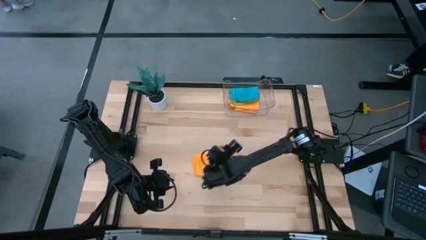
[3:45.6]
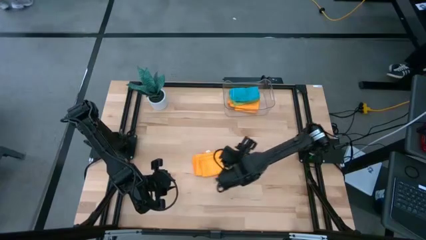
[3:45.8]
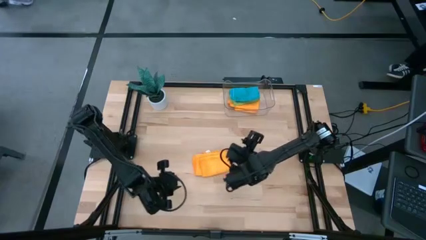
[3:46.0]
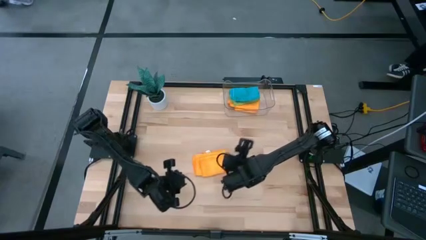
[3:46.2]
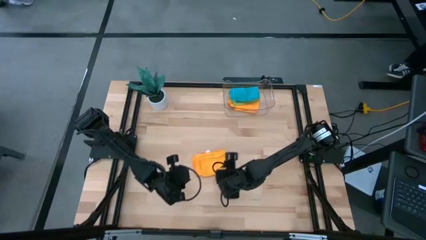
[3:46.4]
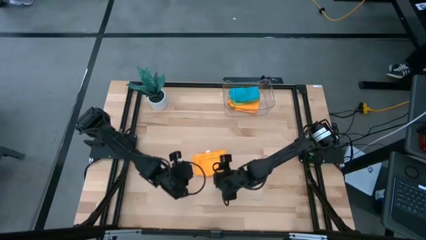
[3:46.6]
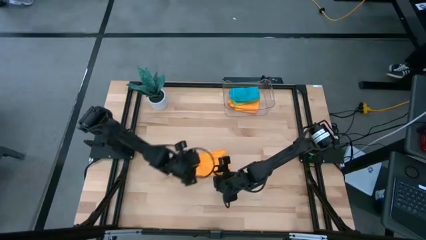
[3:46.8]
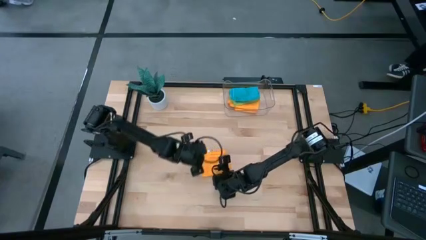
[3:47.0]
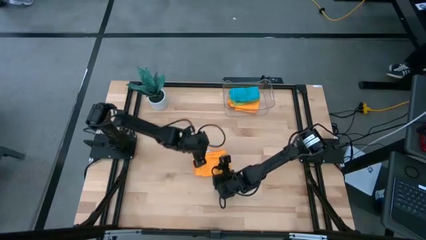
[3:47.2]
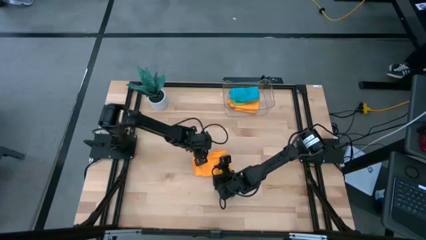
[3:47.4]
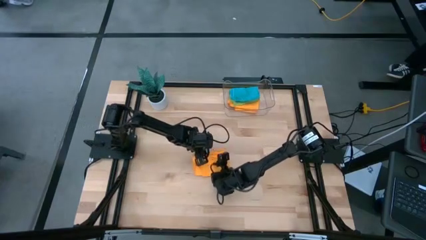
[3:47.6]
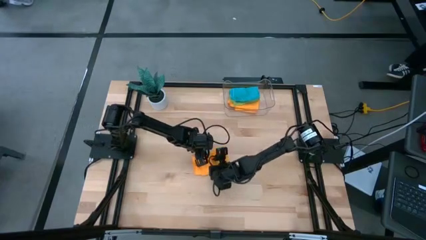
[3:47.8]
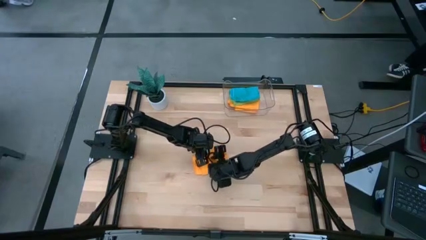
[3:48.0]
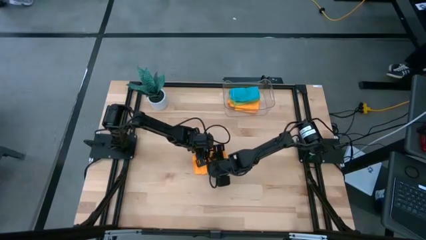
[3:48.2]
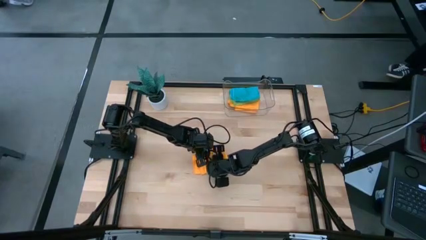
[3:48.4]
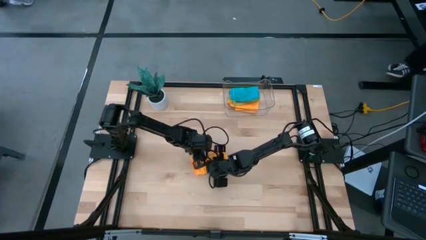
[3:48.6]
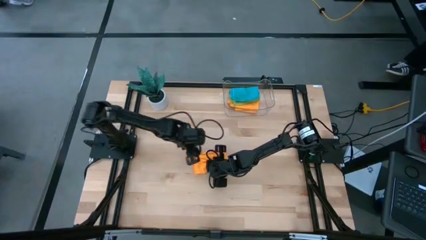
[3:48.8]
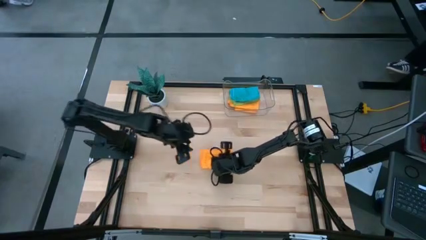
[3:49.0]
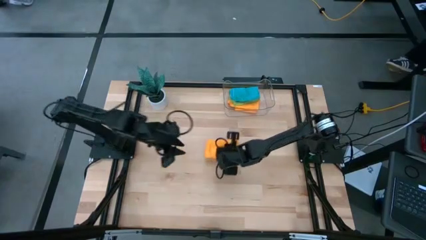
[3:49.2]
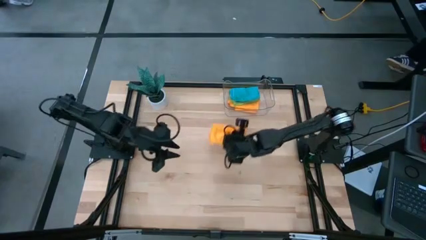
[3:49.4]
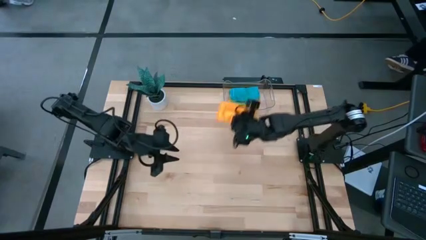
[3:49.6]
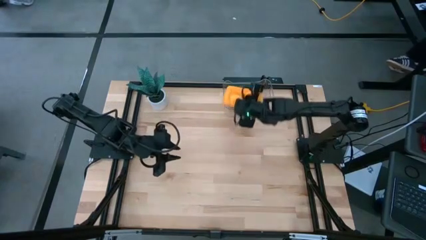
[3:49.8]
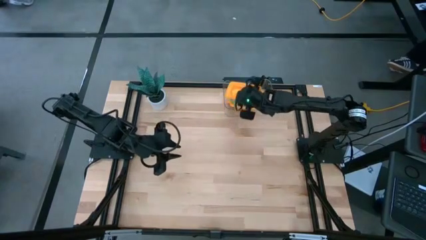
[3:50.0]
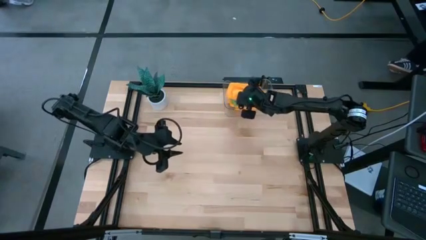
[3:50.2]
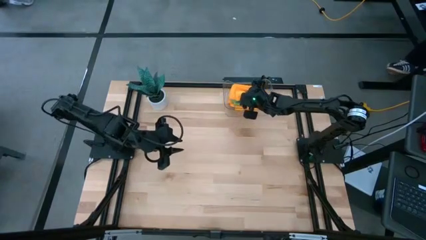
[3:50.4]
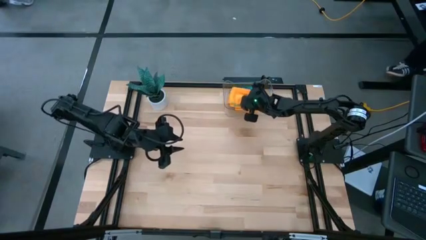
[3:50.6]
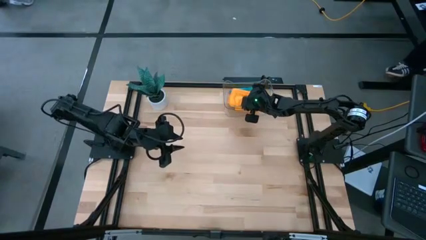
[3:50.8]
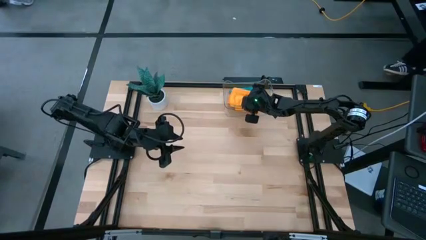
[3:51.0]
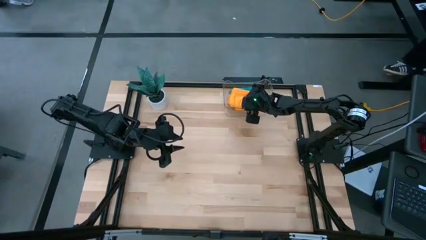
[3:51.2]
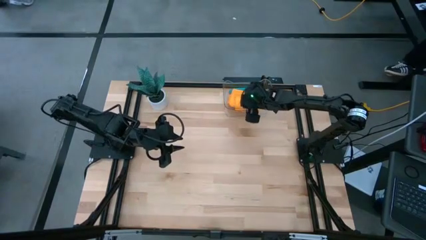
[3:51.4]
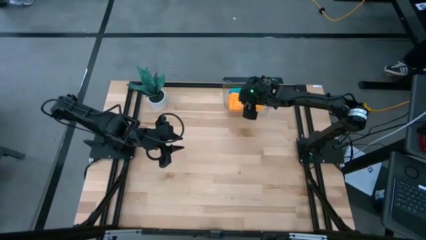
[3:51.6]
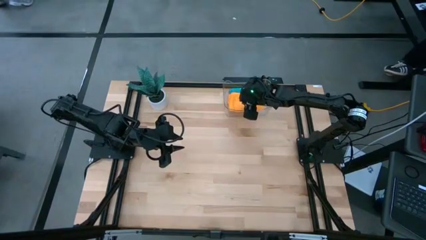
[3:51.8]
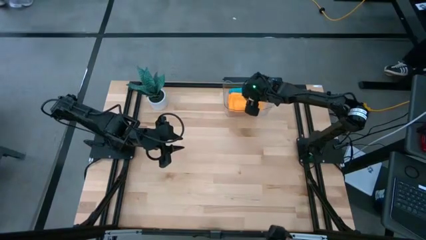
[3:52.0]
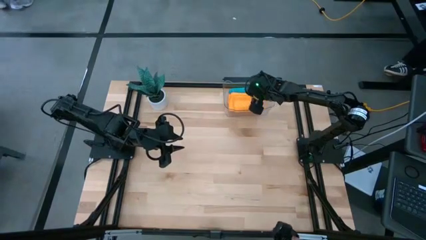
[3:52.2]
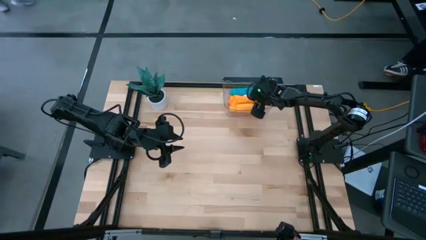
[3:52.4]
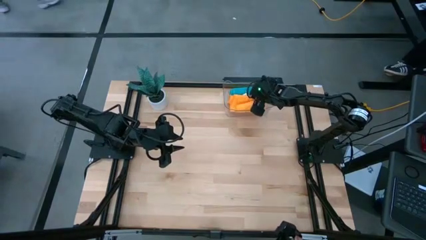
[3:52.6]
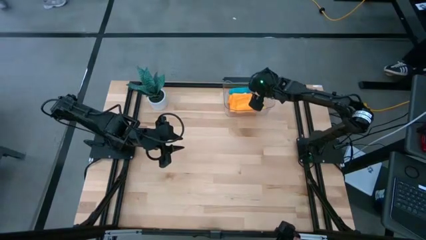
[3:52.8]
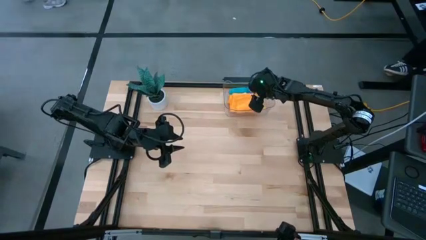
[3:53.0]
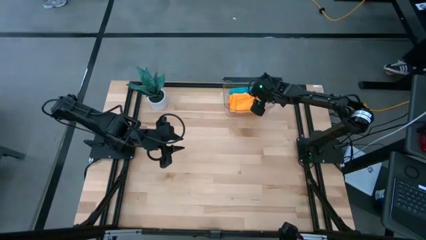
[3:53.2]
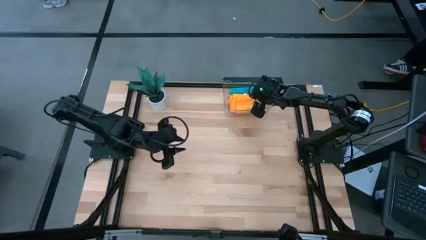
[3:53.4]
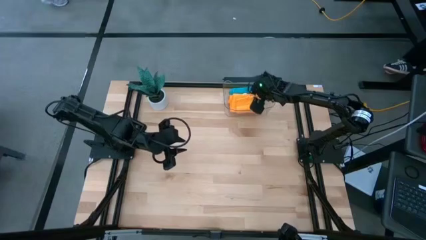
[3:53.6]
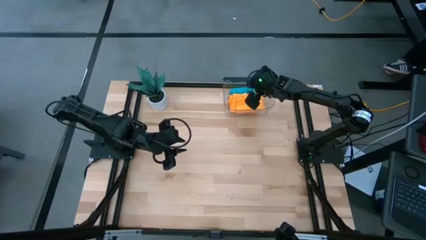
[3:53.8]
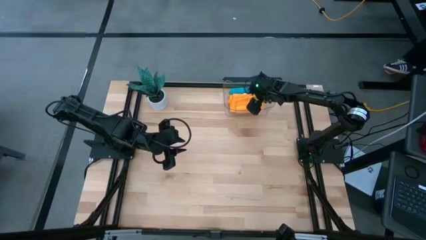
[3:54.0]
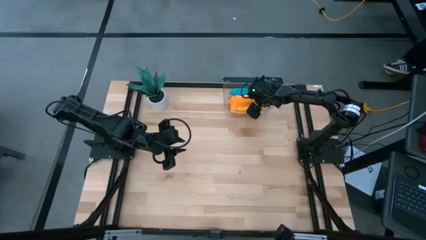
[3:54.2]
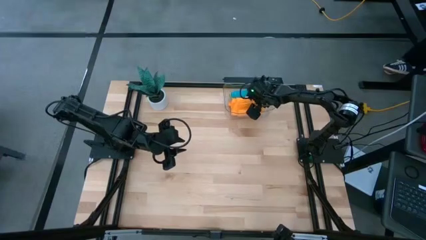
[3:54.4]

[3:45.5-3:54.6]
Task: Fold microfiber towels
Put the folded orange microfiber towel into the transparent bin

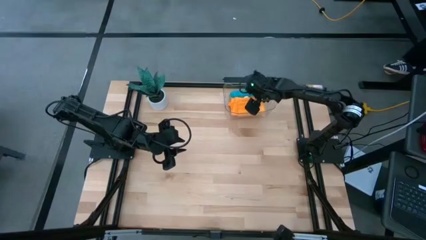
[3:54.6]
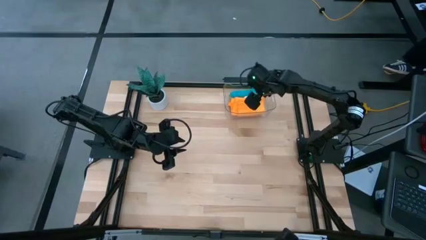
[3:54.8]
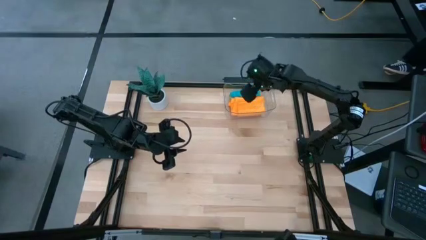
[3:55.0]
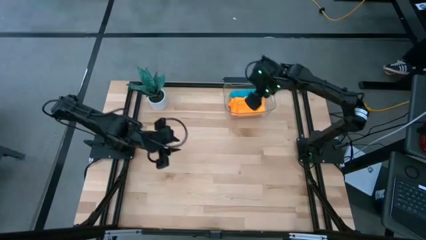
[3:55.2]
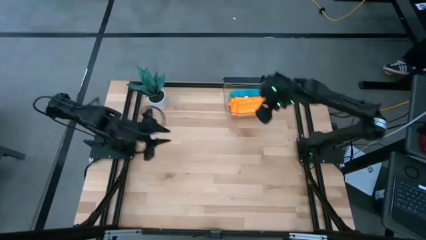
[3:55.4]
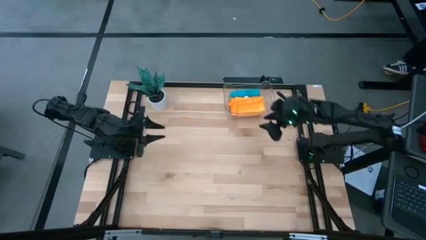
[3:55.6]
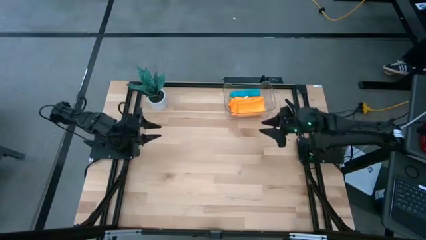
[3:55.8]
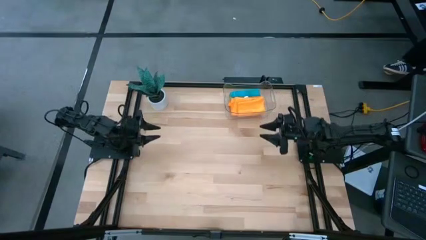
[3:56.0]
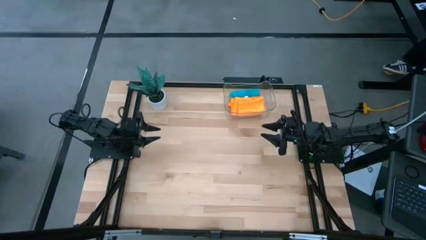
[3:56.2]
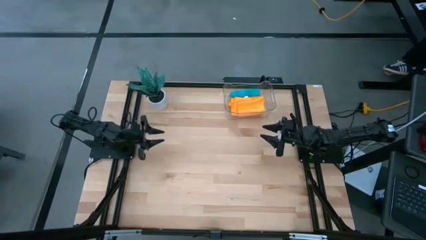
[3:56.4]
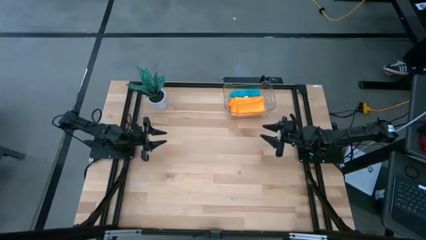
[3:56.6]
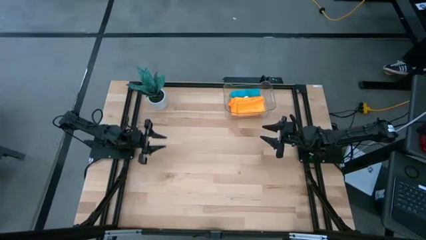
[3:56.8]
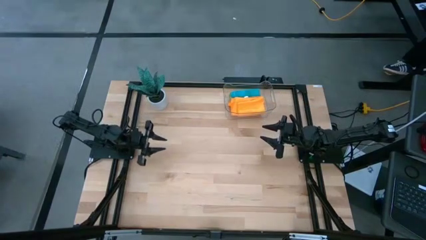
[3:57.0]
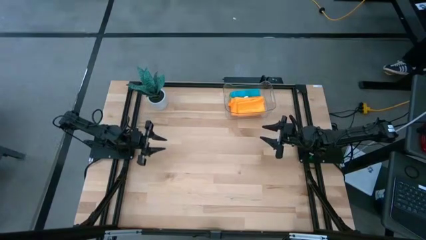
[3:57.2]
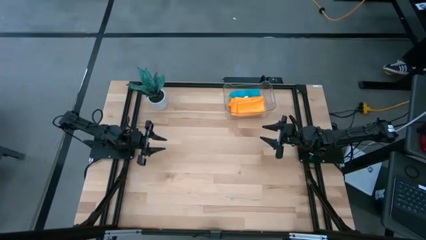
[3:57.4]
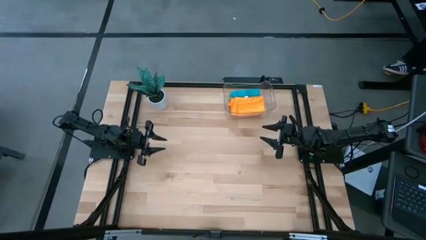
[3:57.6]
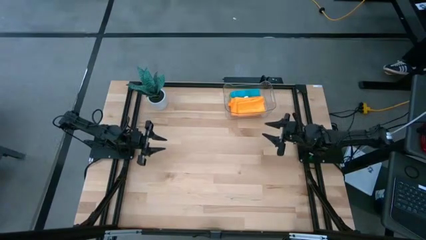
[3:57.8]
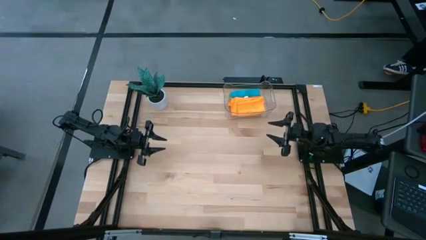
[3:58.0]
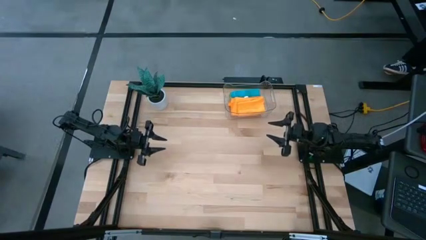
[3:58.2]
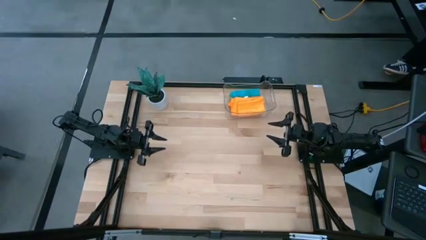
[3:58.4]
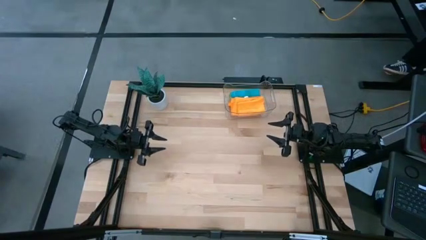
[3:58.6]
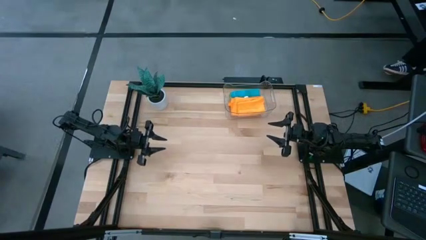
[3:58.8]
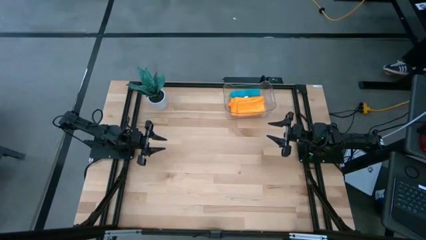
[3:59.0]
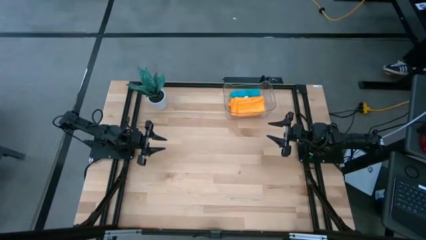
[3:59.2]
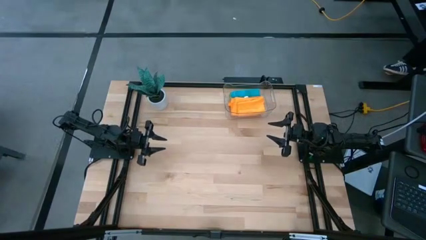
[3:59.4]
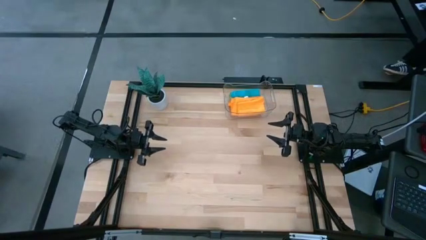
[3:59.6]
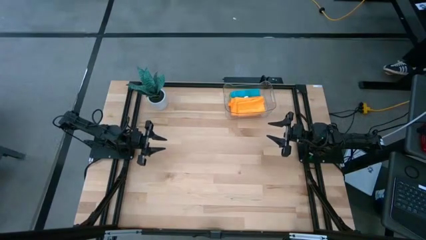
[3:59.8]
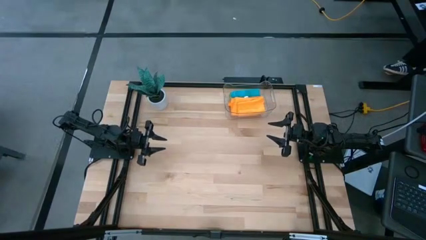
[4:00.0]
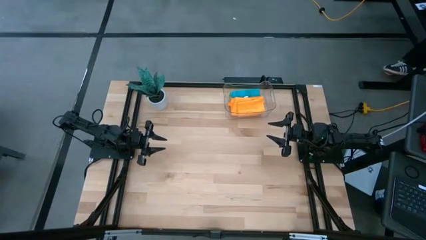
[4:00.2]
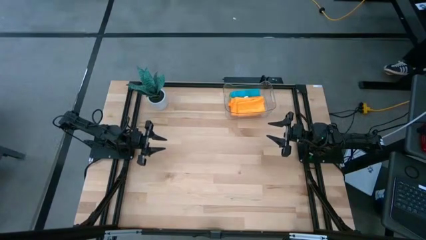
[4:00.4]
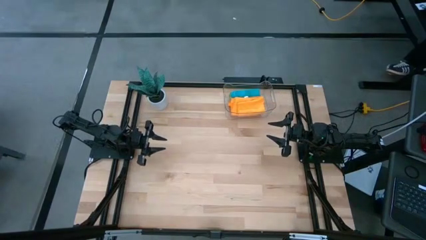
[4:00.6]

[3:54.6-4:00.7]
Return to Home Position
